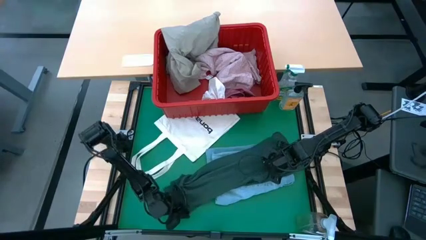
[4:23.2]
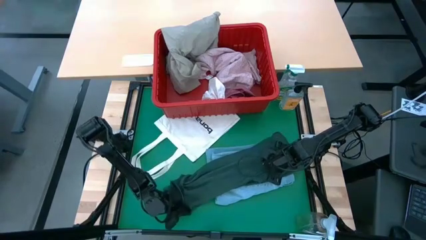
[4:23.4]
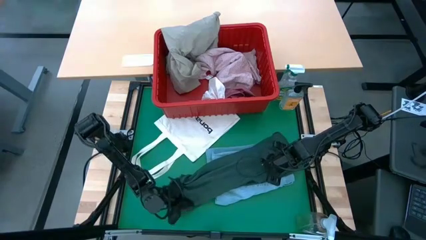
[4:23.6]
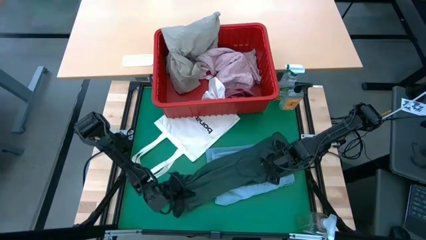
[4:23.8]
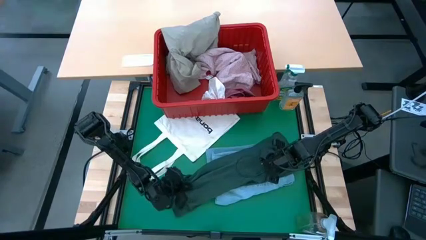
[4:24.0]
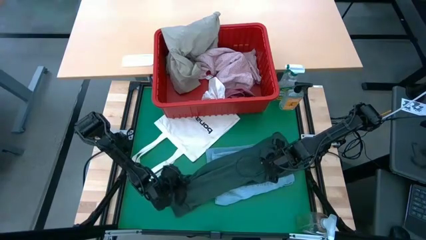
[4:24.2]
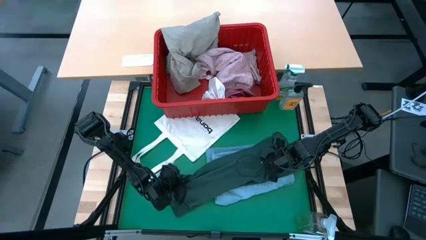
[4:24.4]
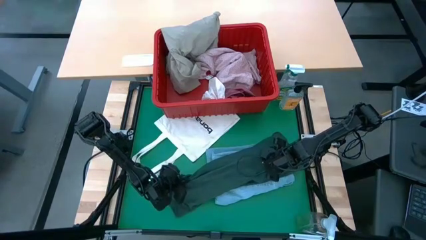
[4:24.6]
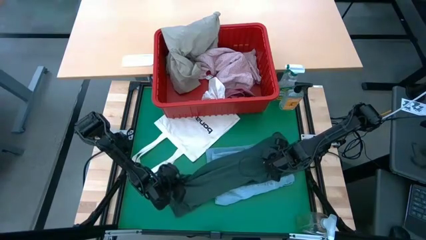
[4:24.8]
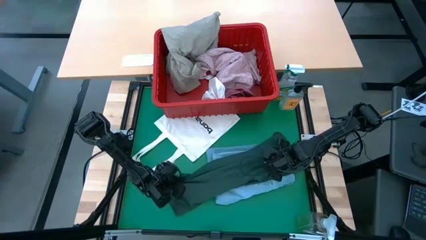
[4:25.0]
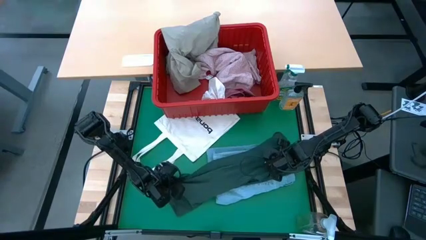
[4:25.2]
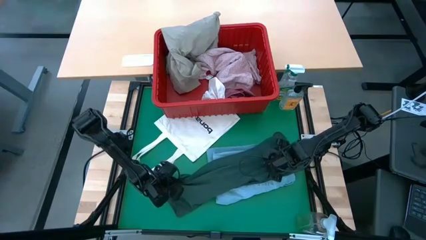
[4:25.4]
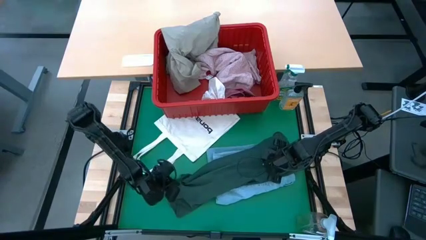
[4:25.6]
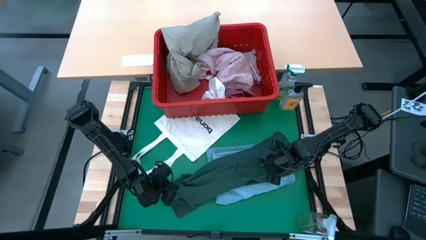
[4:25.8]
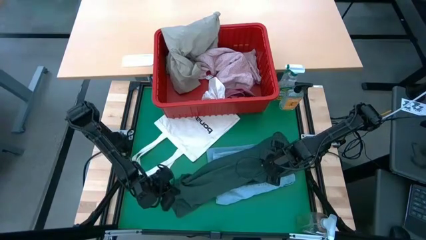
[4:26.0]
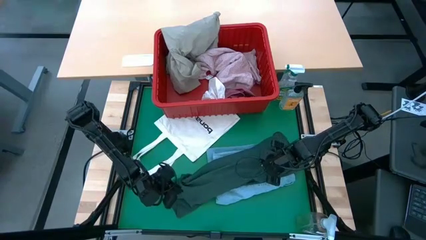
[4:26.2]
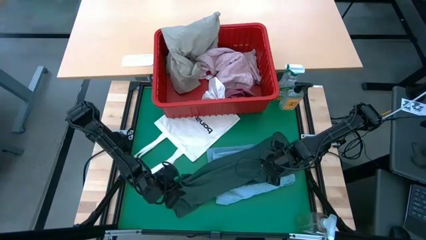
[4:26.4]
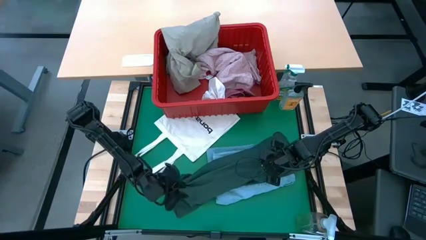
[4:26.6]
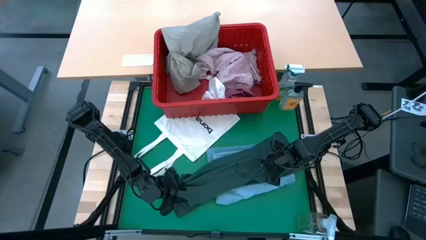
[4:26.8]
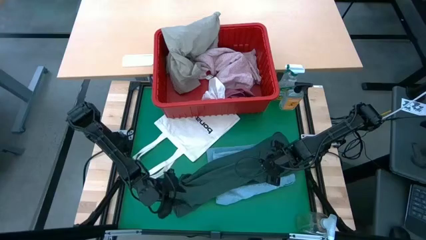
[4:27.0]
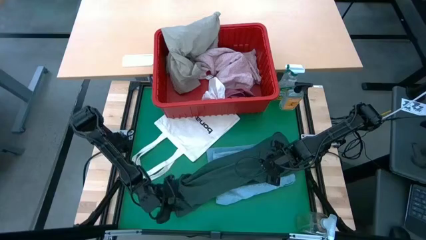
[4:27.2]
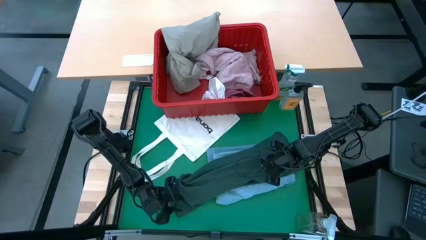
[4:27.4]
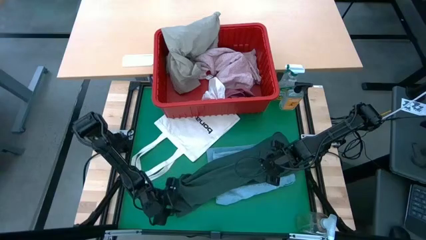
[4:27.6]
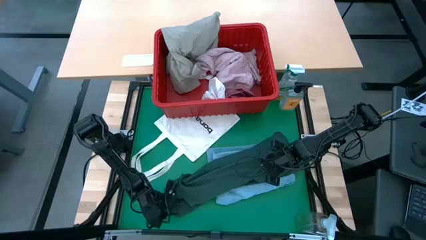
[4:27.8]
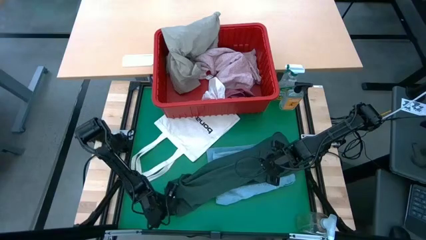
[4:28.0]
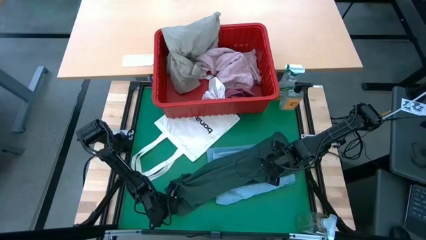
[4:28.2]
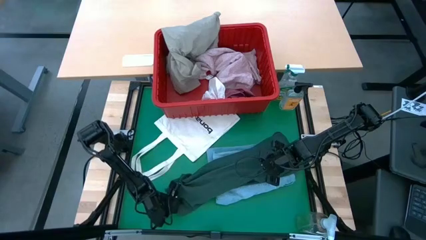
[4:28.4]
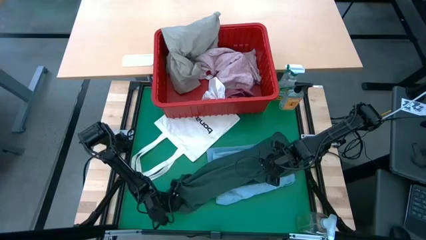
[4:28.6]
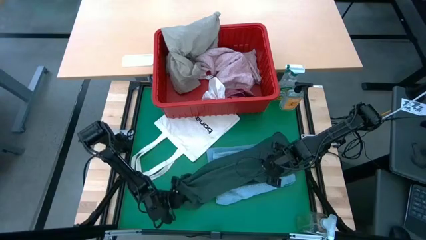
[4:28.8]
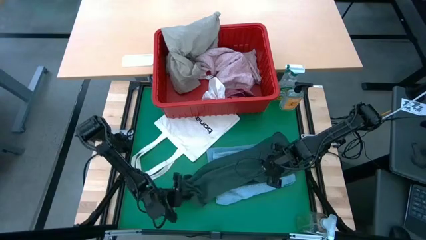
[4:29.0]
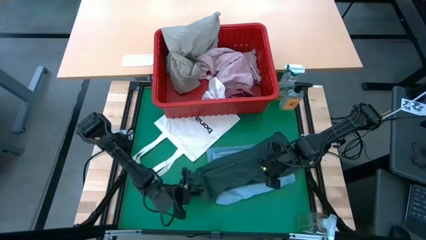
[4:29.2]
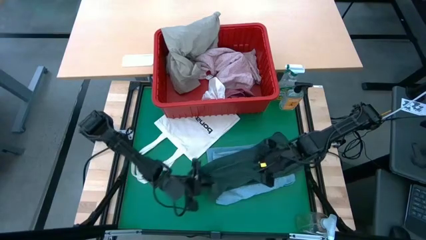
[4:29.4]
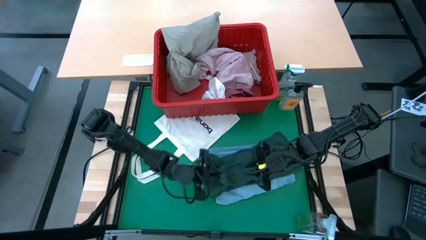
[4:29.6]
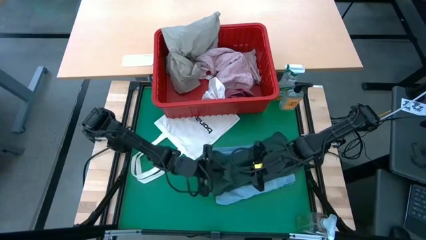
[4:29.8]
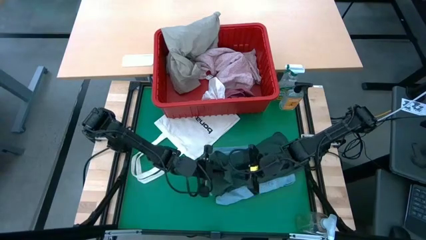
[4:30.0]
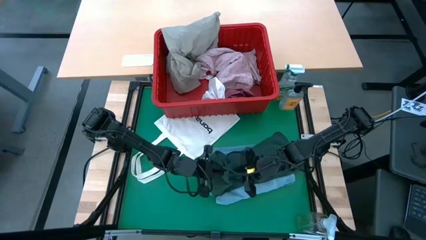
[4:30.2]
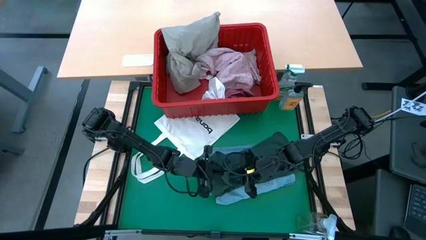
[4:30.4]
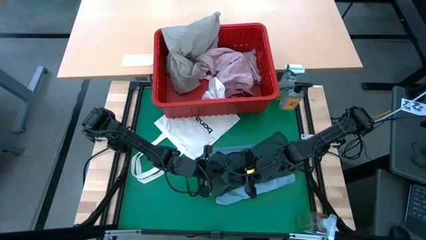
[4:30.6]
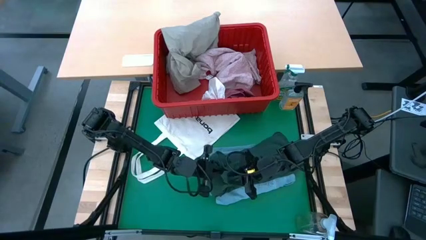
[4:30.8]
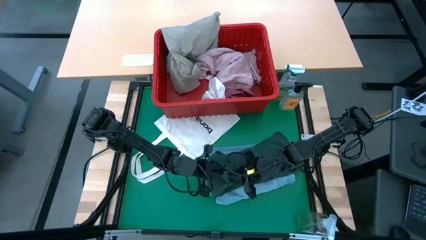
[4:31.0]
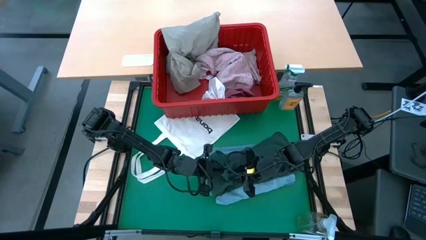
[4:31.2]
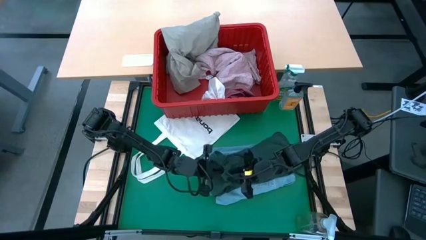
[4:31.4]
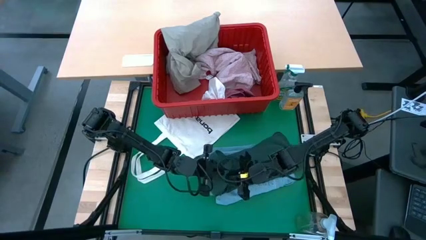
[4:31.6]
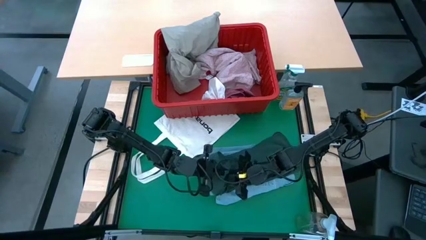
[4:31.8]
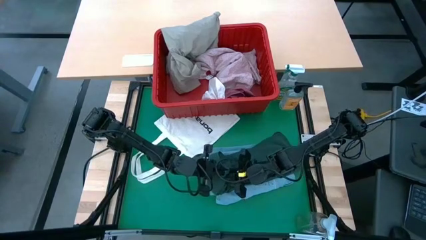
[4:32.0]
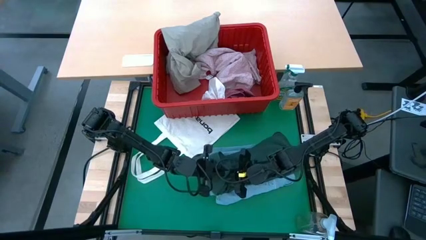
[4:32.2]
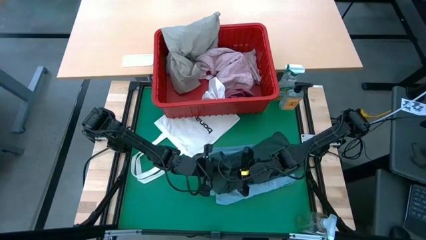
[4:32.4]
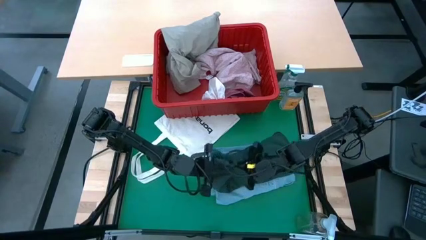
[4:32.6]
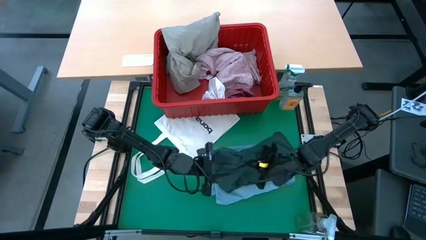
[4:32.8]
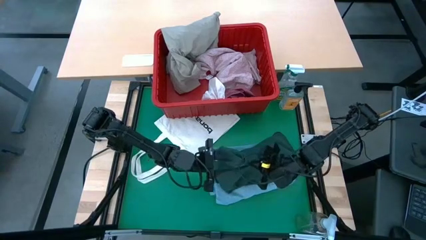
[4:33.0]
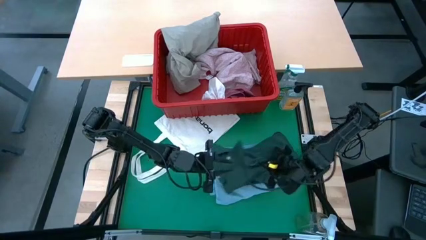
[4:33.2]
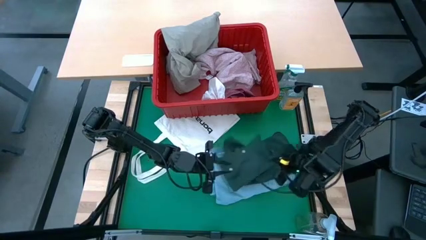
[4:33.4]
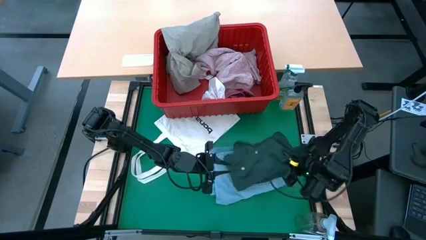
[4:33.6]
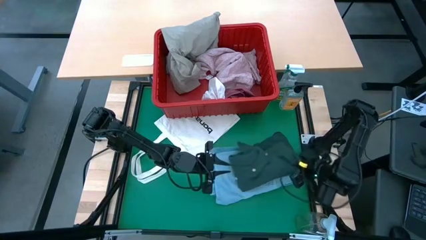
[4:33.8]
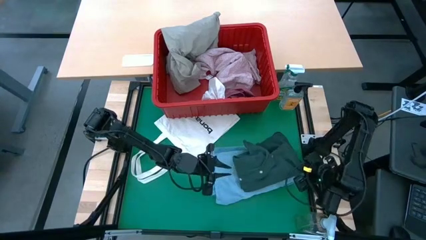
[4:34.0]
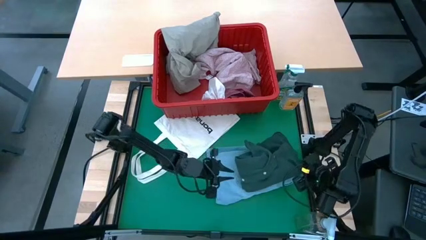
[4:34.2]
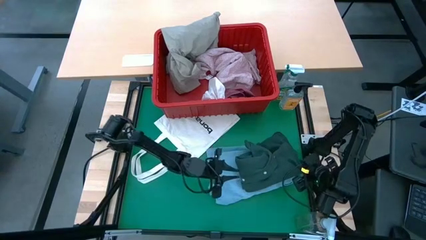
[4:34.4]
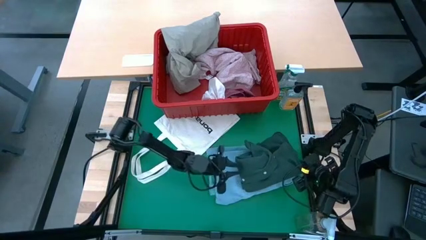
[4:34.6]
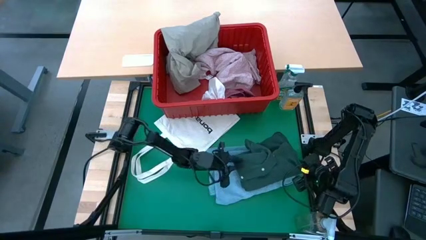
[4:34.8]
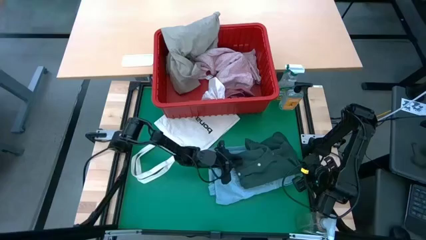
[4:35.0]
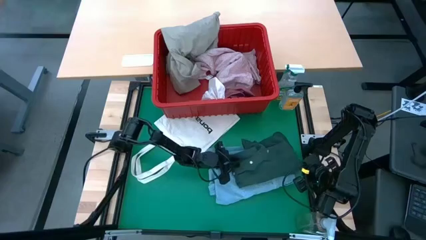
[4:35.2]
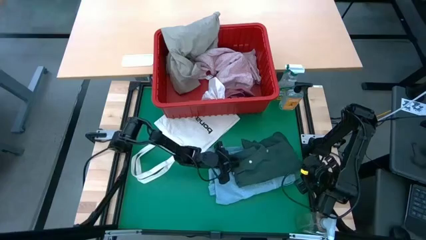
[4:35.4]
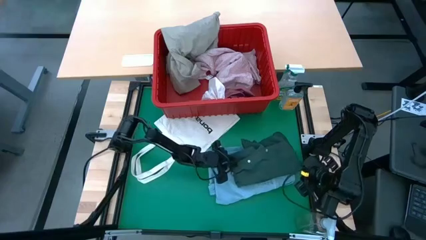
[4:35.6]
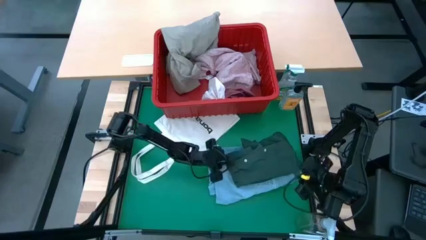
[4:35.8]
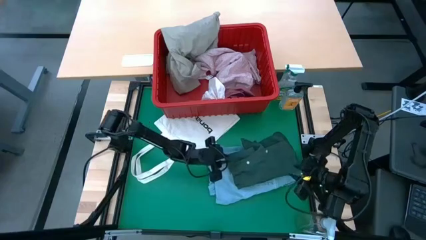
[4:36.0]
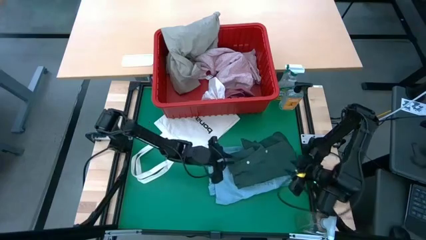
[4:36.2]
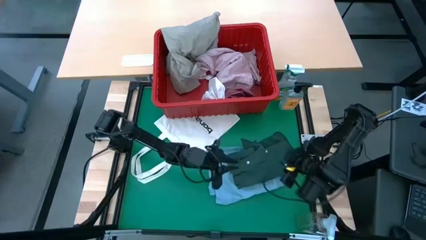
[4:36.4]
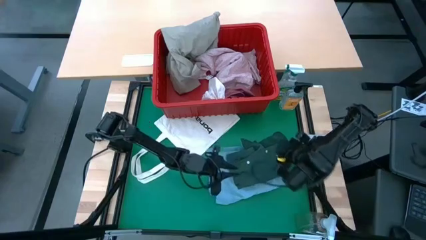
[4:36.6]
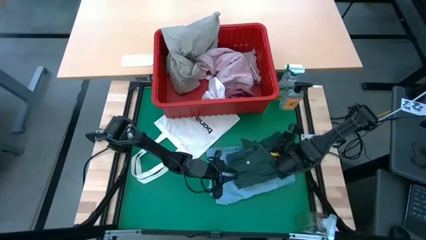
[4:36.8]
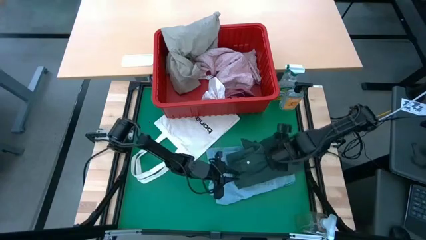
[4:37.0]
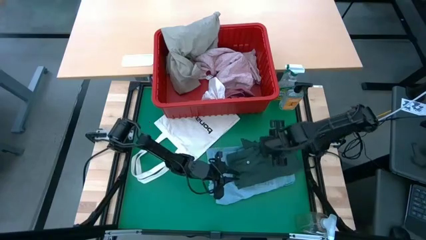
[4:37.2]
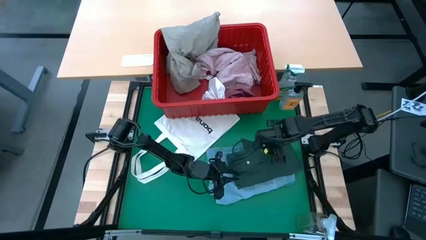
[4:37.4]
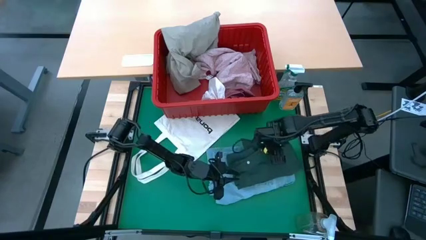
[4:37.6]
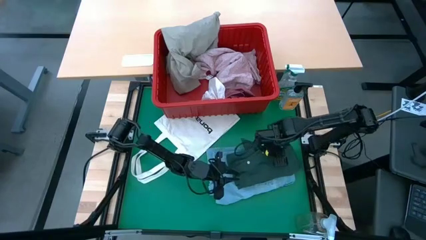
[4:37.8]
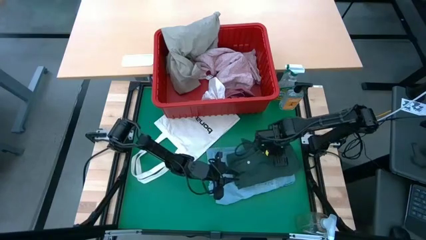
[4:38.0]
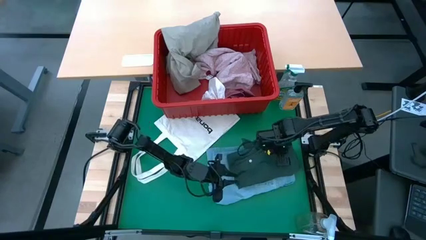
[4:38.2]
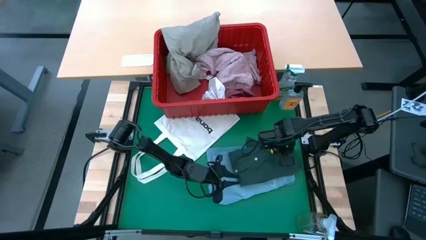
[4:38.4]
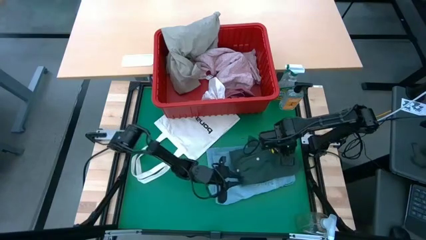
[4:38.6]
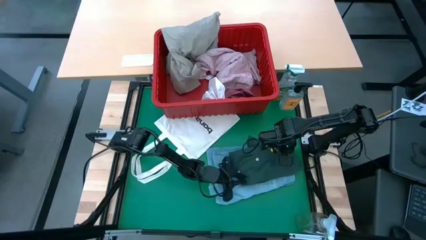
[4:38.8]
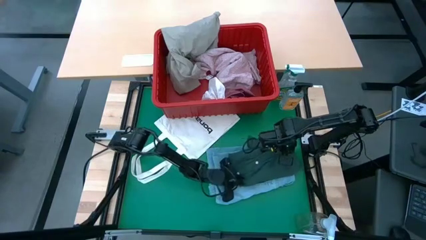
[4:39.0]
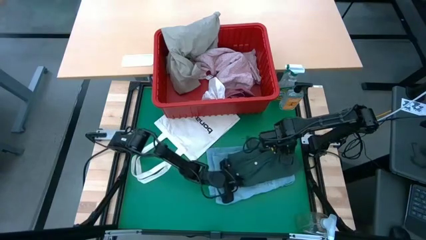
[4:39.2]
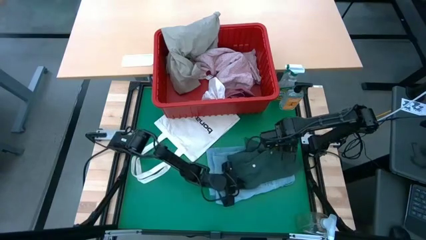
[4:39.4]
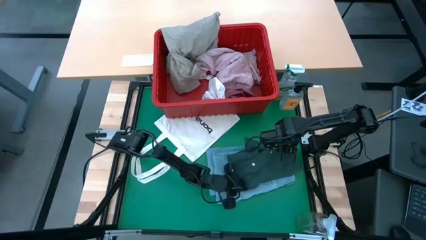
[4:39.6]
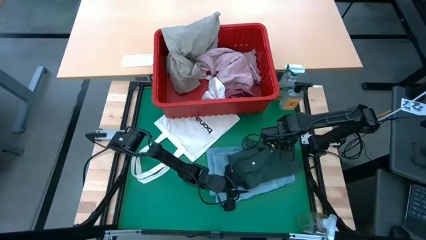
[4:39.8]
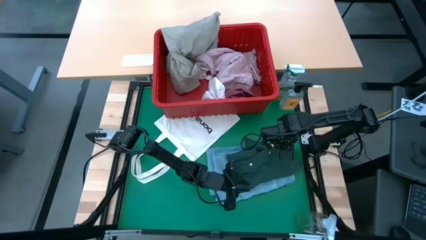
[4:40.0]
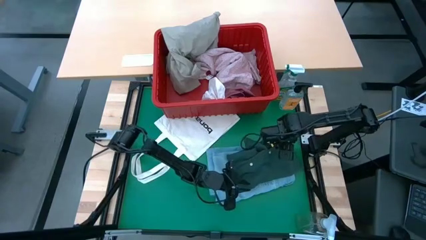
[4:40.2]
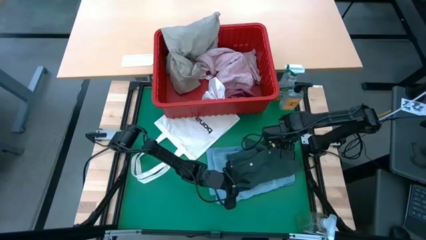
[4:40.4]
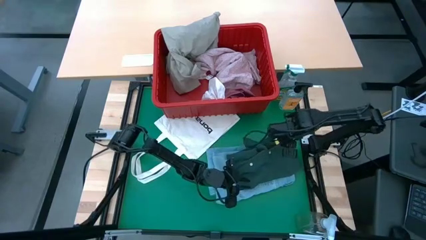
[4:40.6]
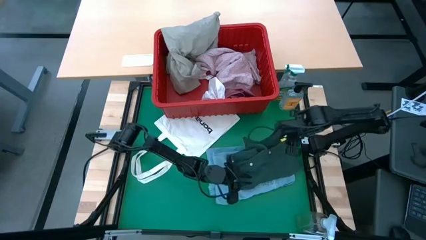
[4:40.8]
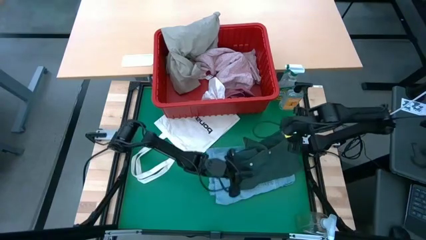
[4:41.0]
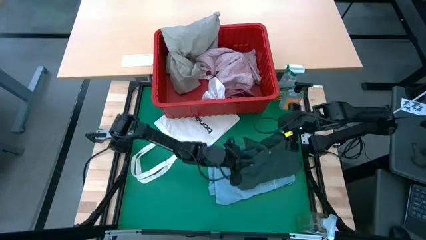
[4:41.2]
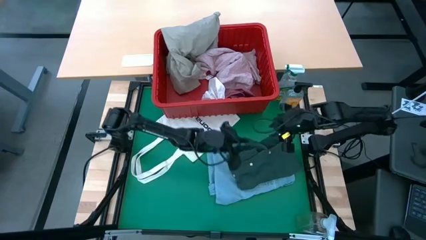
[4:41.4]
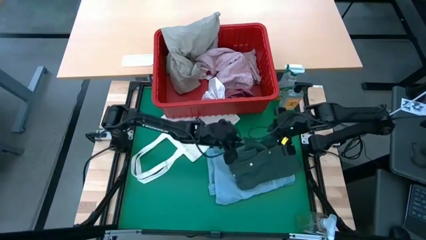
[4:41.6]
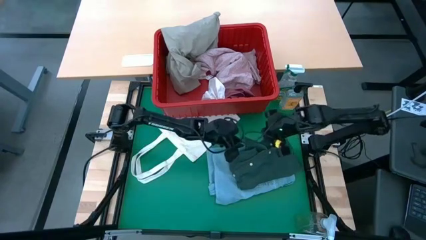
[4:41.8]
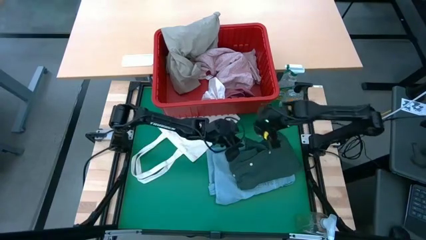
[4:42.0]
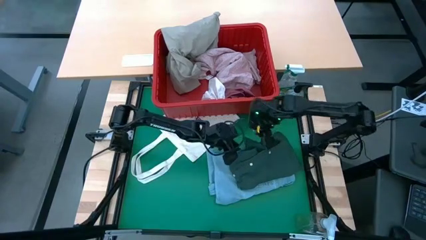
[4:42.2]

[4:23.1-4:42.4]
Task: Fold laundry
Fold the green shirt
